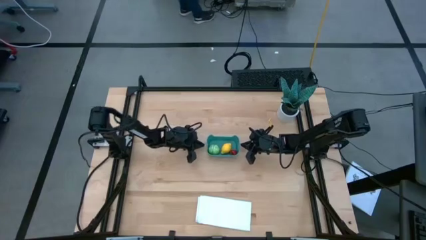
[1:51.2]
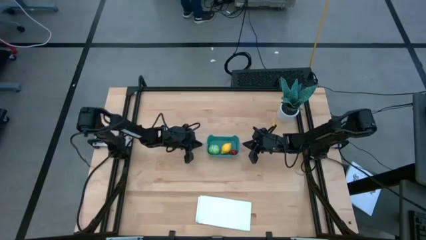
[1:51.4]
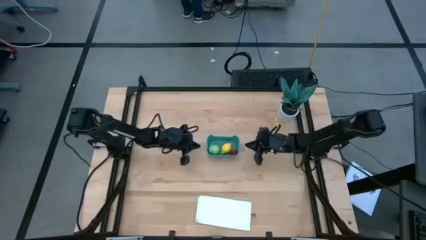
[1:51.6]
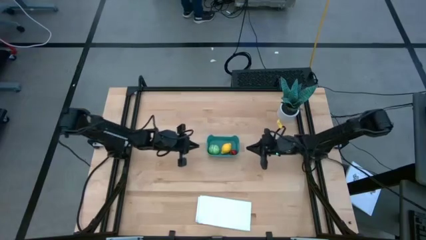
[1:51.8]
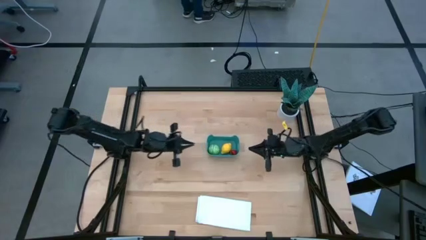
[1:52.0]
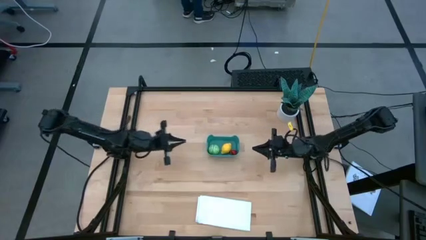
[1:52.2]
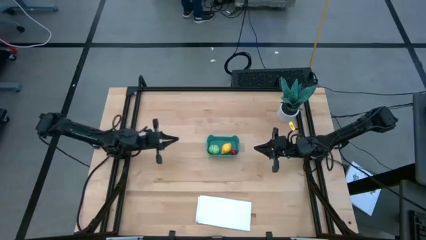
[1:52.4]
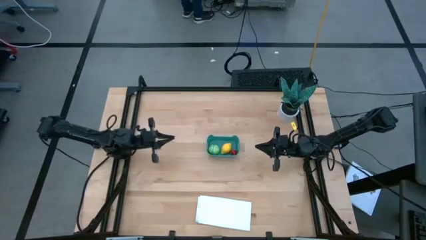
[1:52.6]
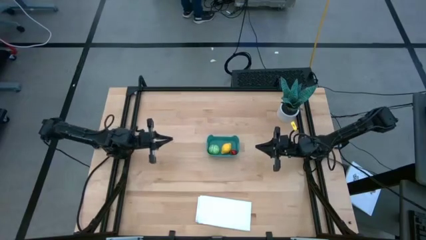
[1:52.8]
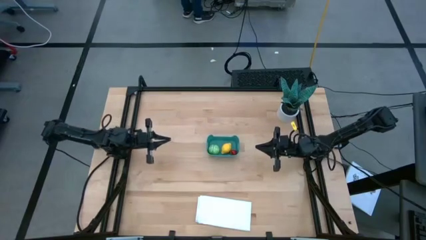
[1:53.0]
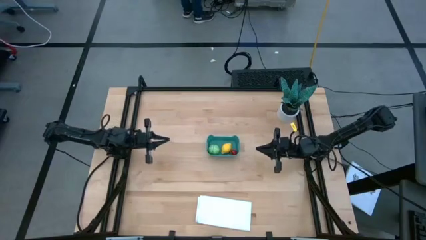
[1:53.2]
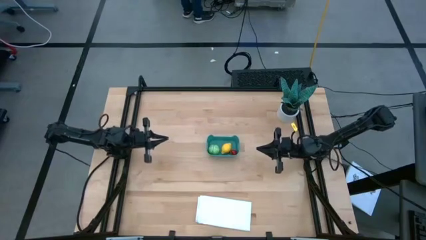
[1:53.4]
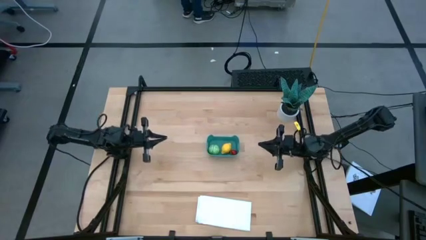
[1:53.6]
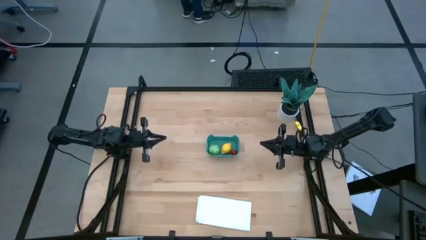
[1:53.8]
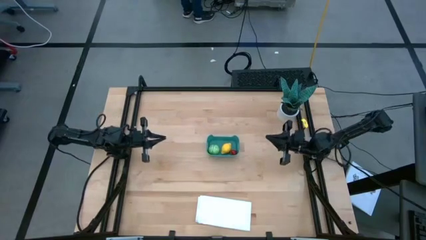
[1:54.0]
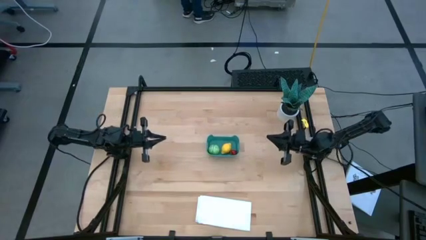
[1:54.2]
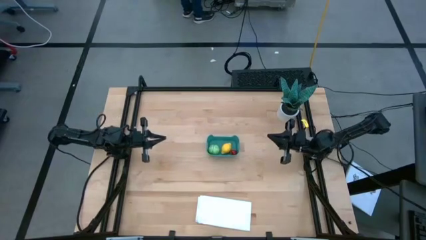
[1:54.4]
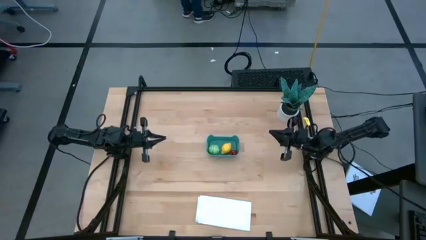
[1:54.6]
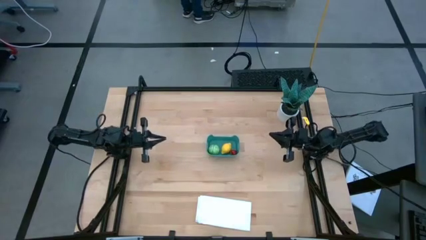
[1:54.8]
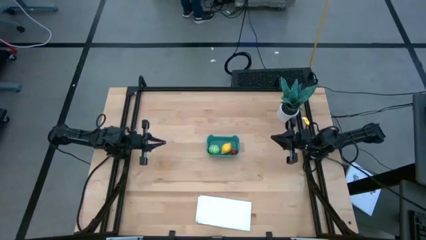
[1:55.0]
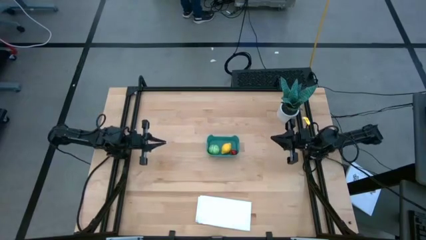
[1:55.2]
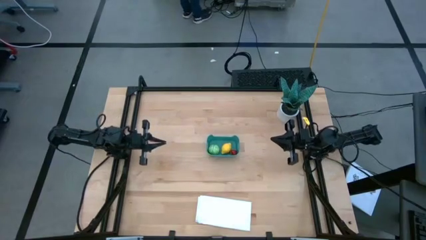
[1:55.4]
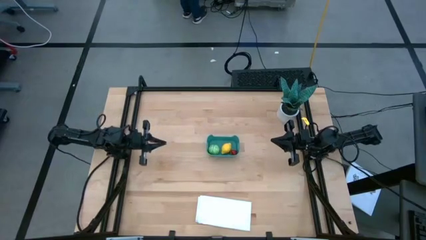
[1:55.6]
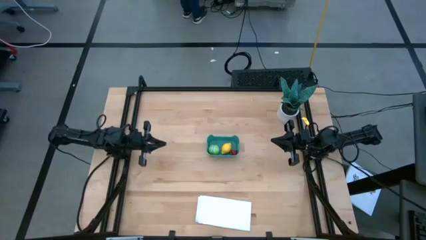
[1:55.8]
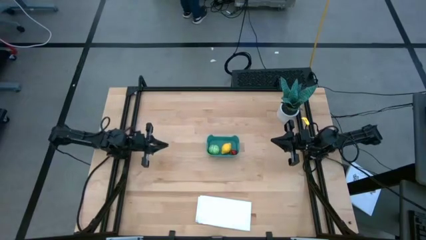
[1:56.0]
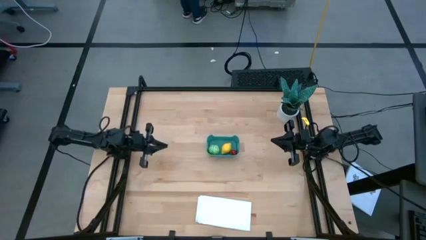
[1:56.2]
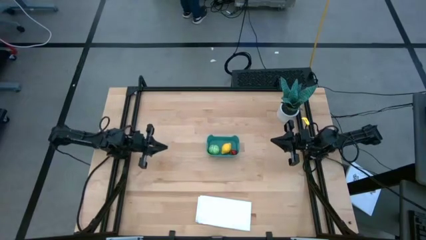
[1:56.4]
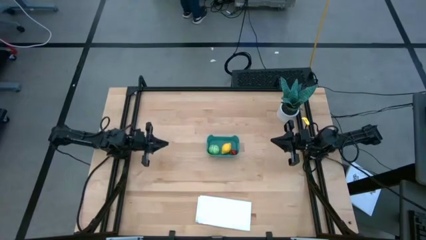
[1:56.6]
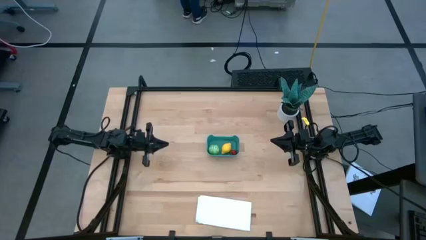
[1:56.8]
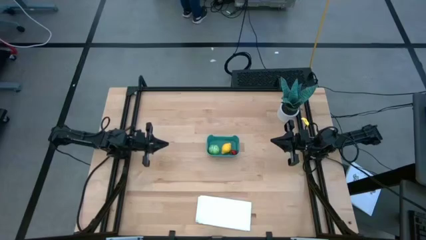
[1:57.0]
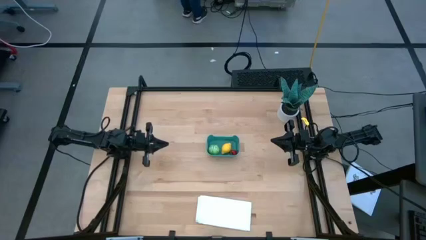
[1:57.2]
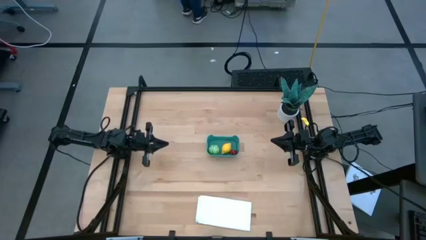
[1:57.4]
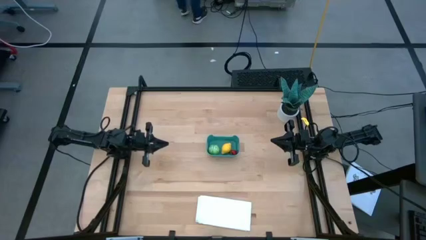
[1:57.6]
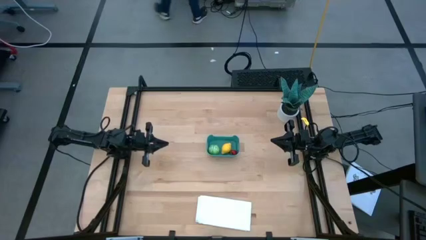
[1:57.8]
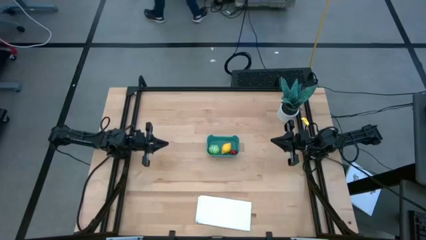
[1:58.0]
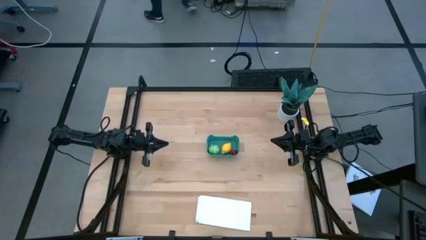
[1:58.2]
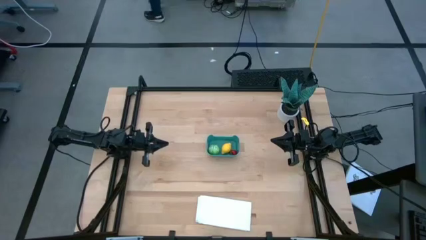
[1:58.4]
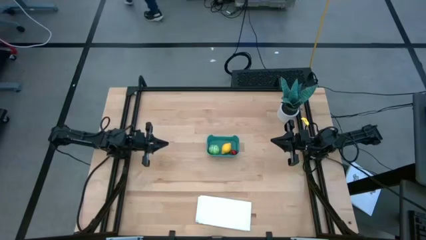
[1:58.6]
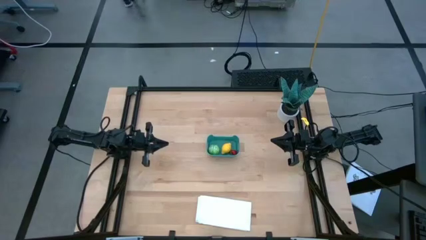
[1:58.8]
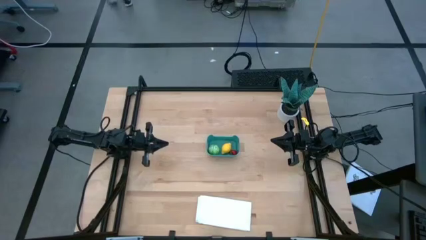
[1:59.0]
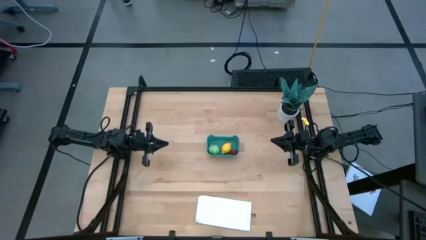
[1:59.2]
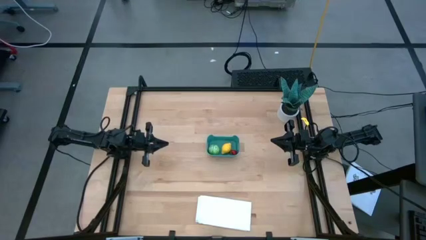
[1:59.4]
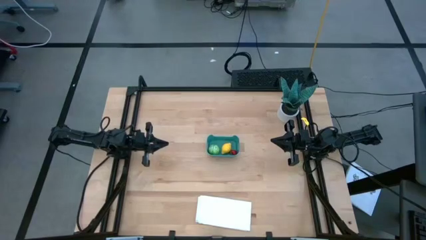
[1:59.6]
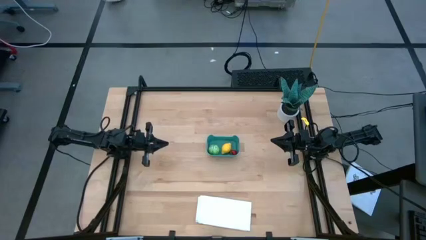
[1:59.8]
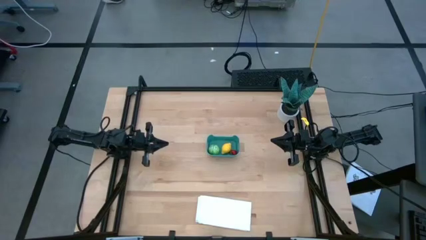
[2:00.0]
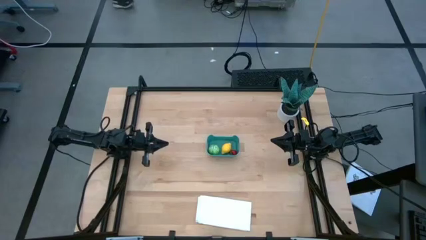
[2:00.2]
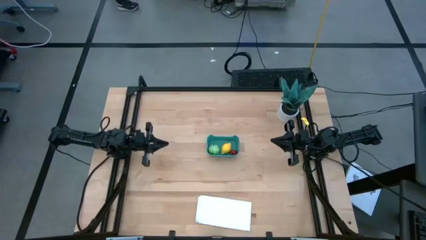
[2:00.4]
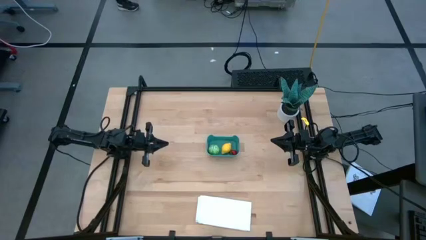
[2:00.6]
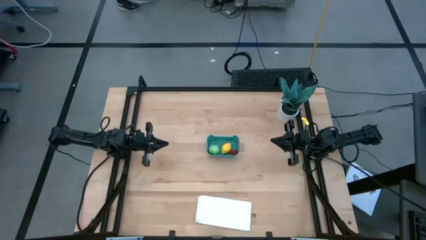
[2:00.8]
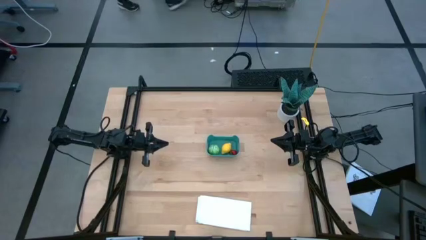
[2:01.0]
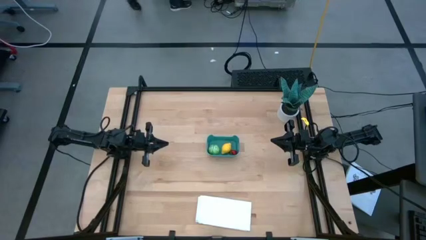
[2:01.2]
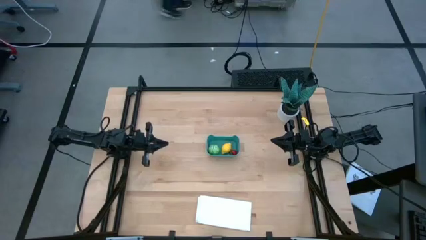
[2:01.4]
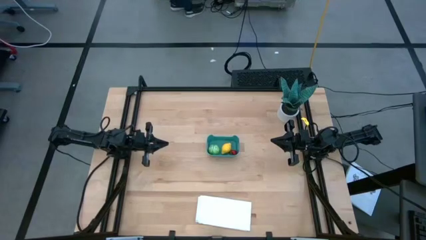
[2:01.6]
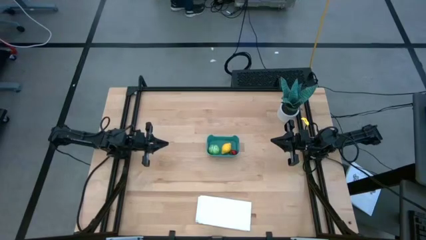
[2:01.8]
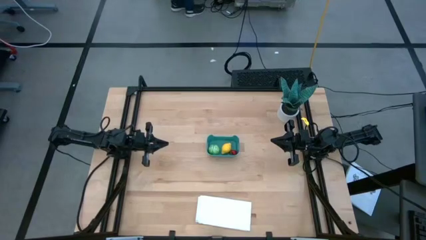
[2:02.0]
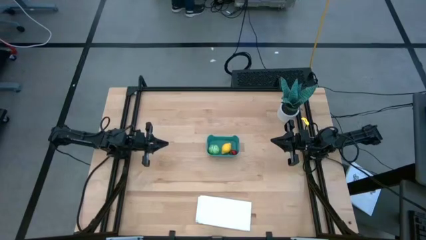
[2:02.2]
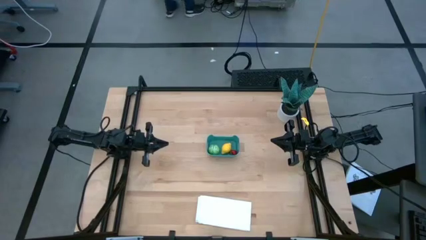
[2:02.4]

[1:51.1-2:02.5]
Task: Pick and placing Produce into tupperware
Return to Home Position
